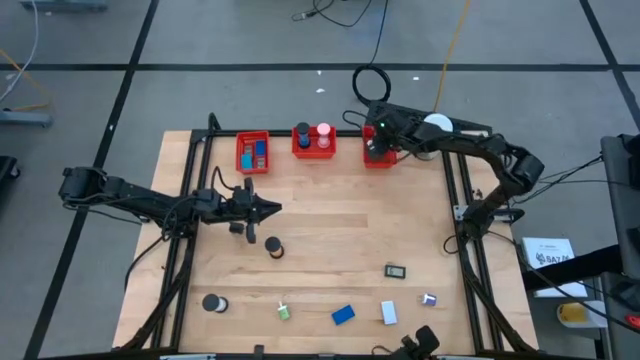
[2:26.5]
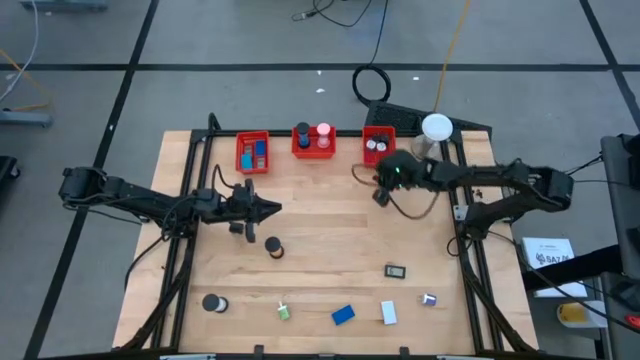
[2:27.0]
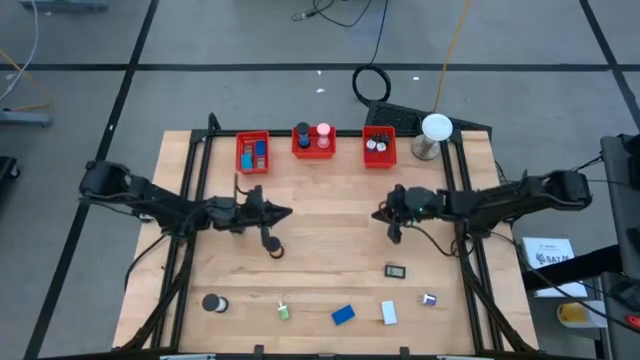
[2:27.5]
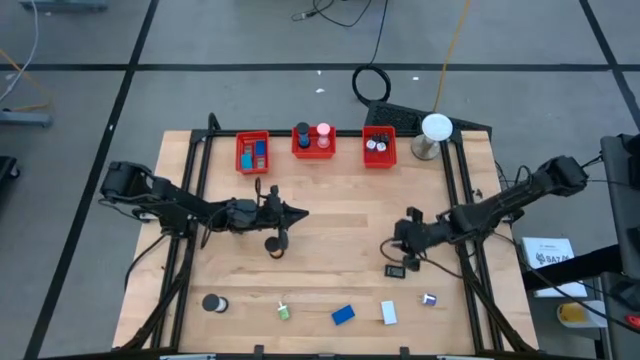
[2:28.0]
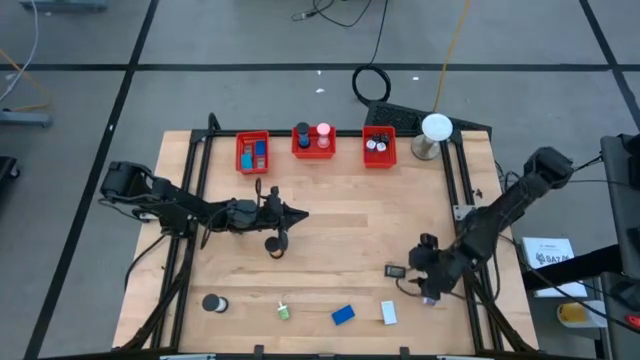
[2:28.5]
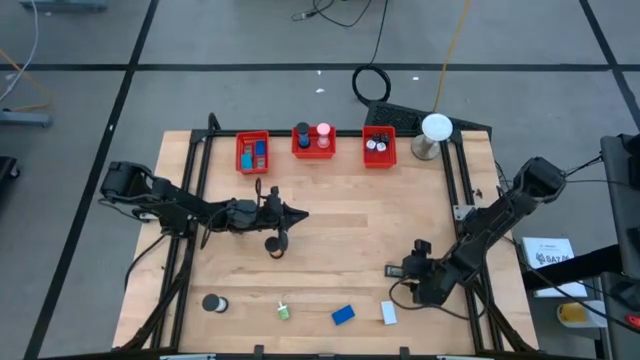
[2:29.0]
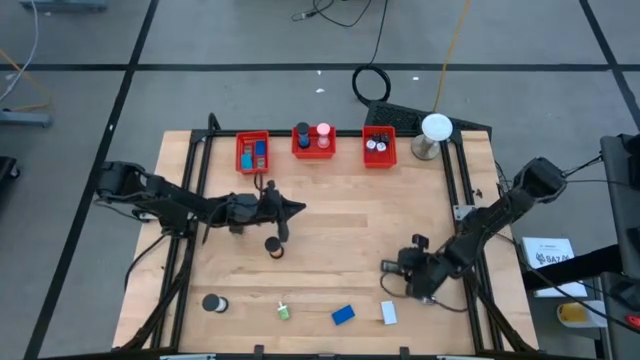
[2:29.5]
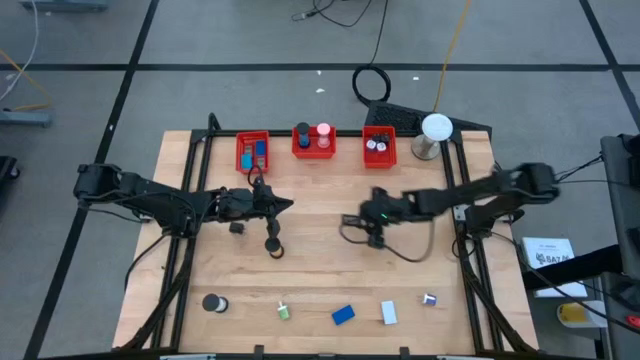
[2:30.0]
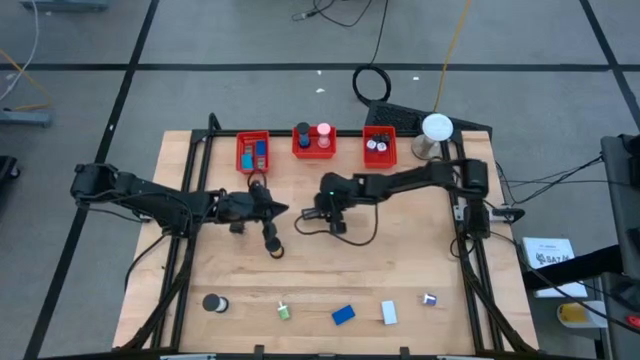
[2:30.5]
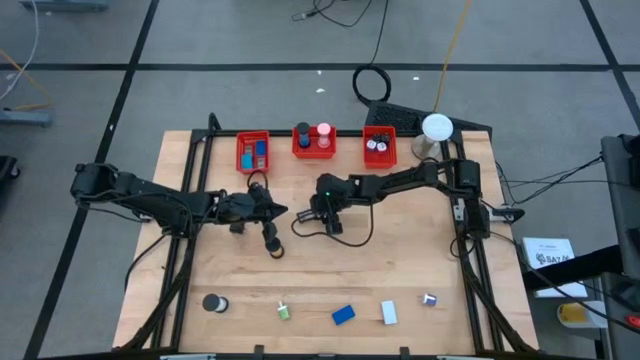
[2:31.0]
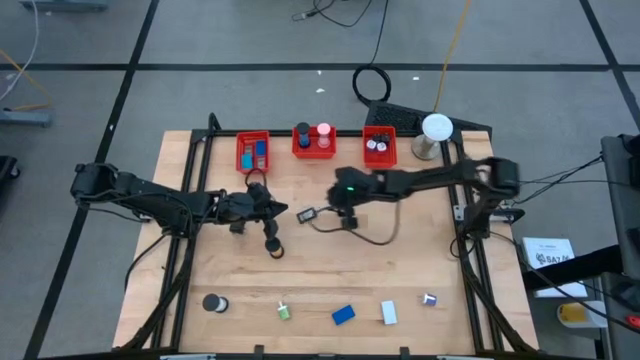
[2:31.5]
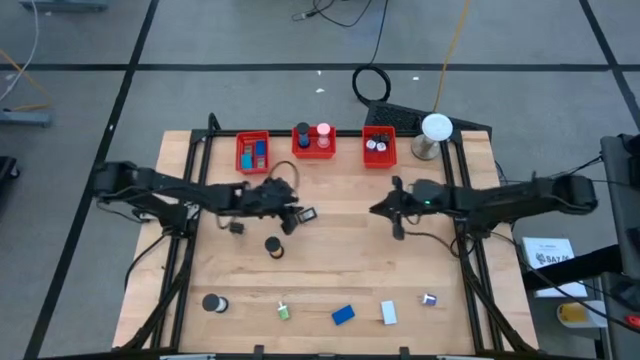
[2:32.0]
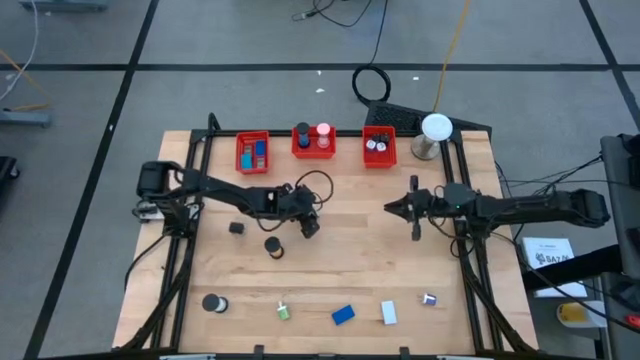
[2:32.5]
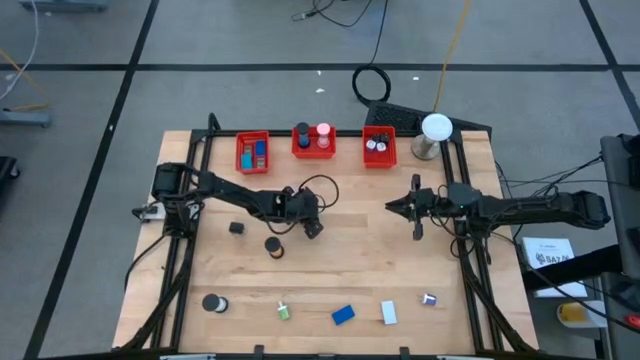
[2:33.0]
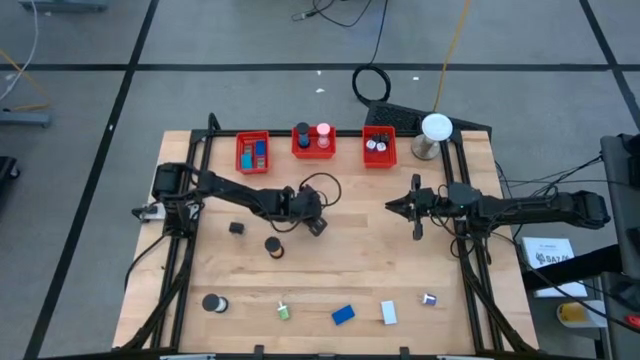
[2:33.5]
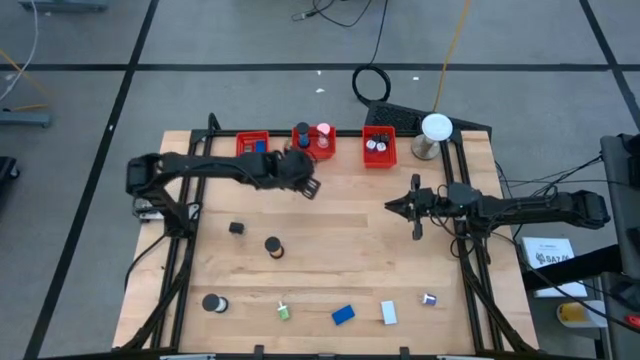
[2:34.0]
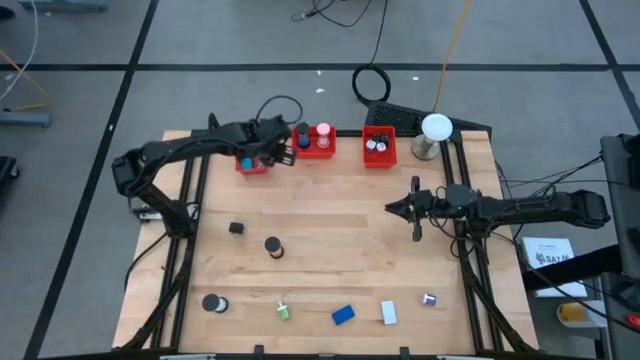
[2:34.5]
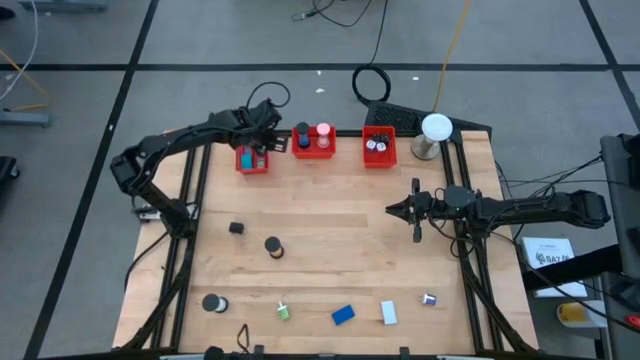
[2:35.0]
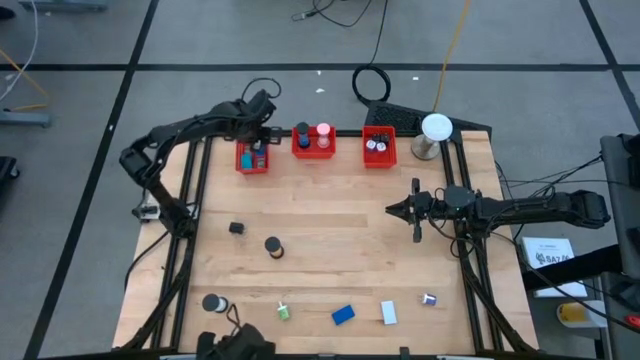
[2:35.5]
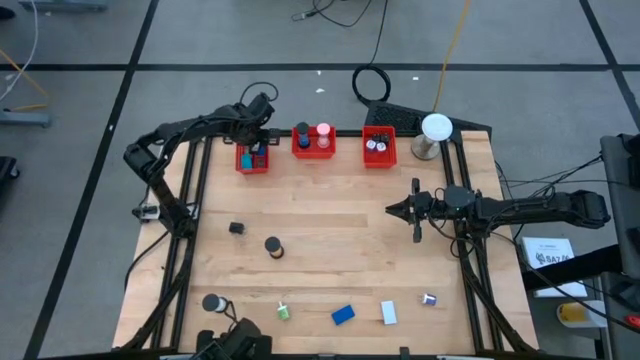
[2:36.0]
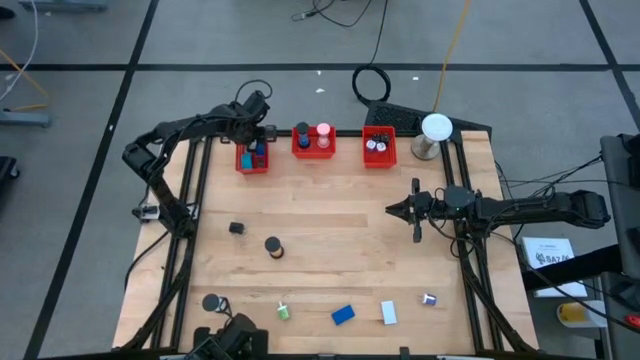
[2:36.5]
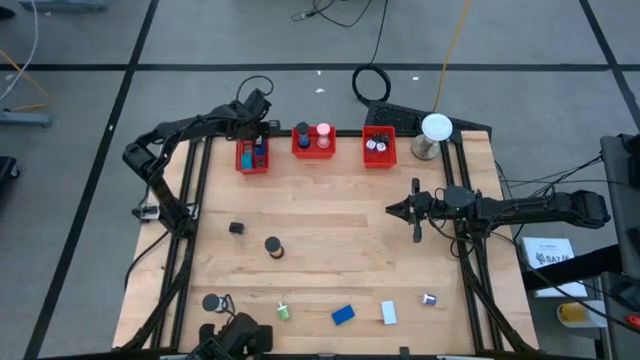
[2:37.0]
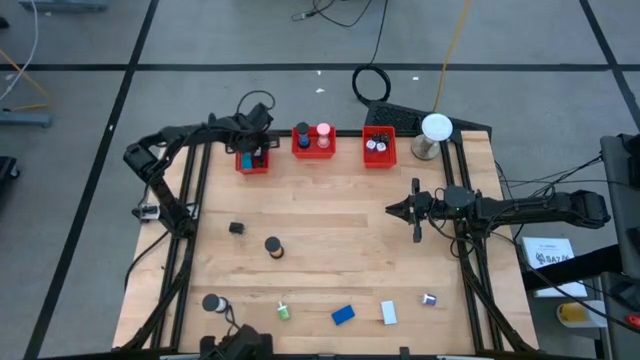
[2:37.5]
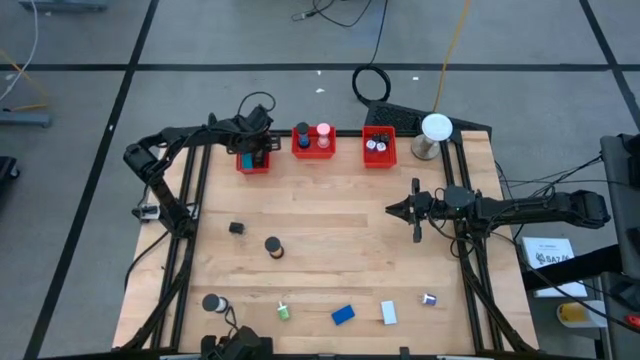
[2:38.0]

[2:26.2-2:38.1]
Task: Pick & Place Office items
Put the black timer into the left orange basket

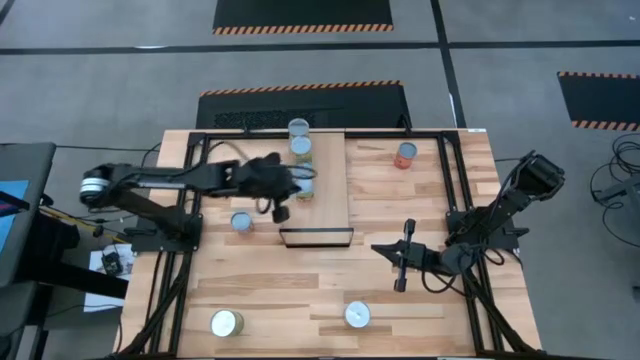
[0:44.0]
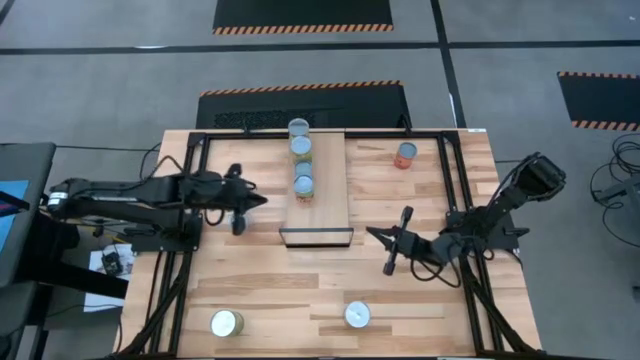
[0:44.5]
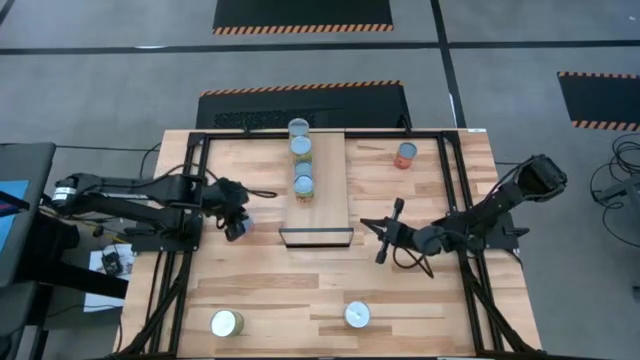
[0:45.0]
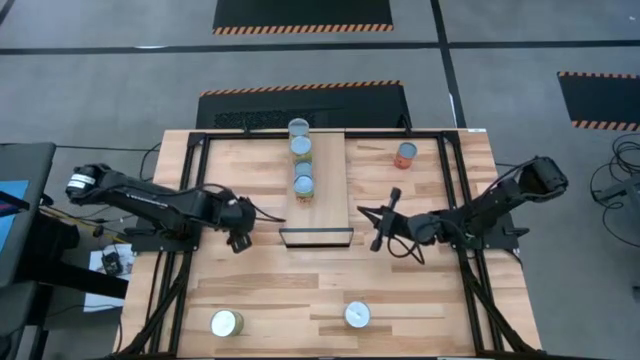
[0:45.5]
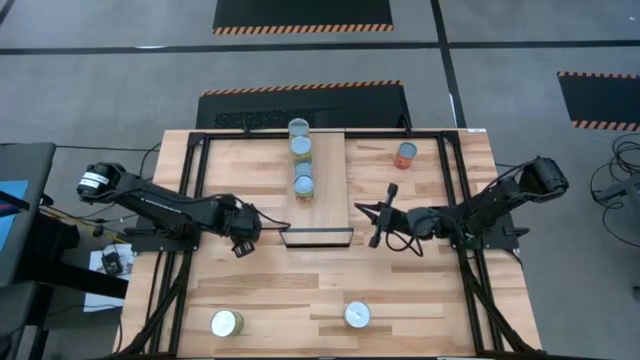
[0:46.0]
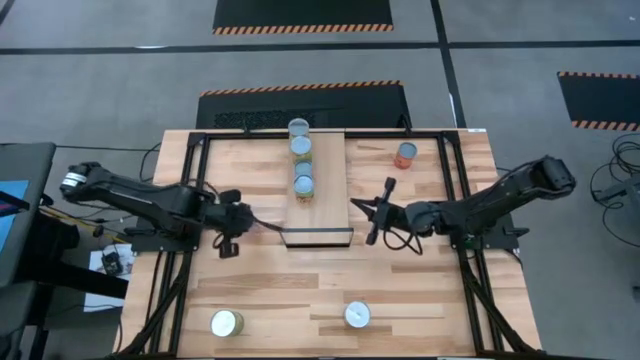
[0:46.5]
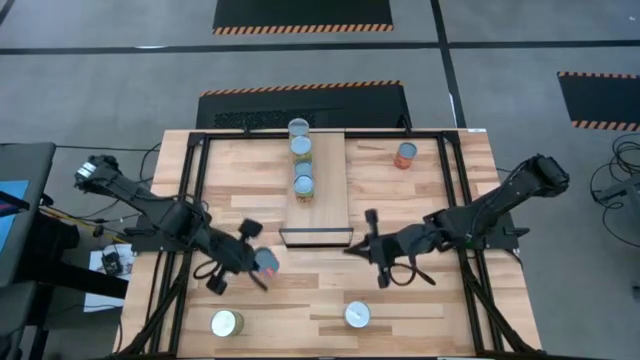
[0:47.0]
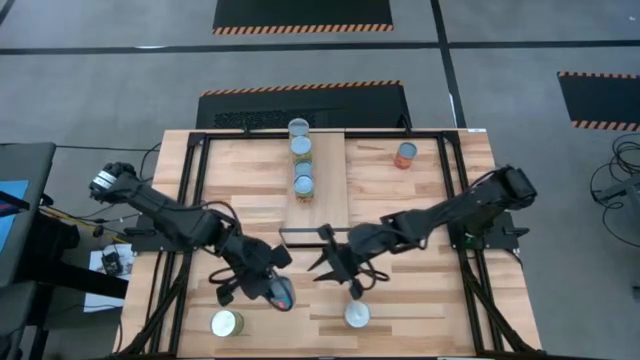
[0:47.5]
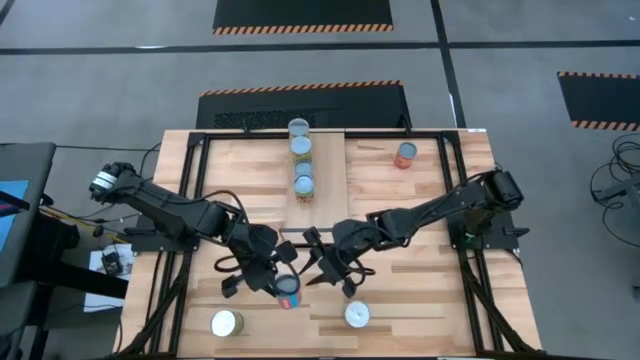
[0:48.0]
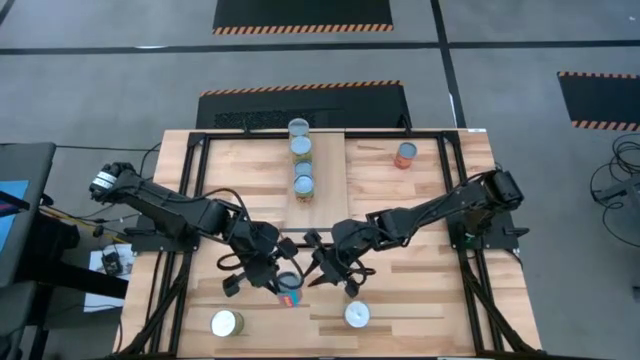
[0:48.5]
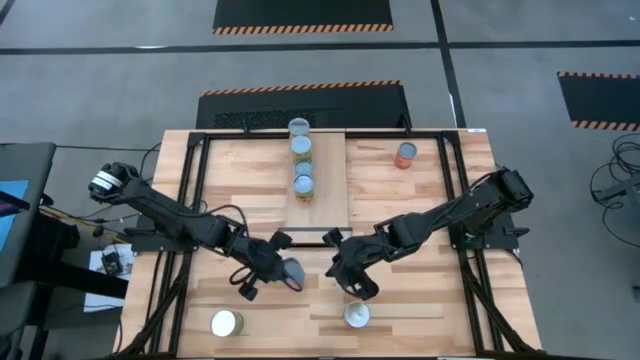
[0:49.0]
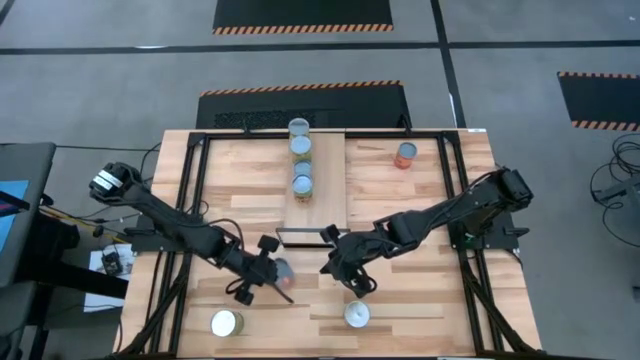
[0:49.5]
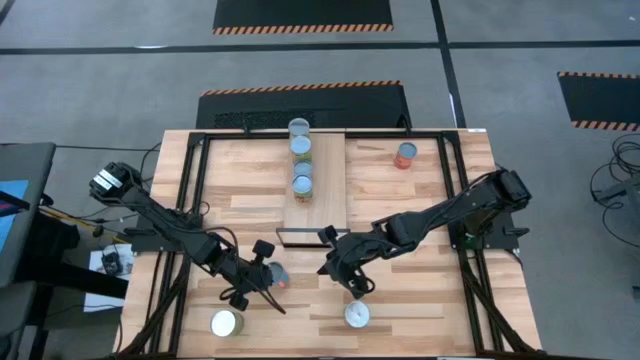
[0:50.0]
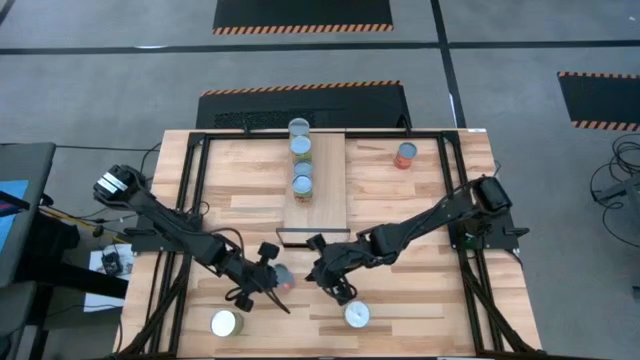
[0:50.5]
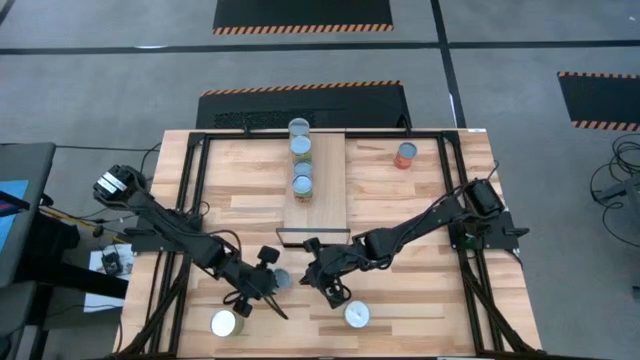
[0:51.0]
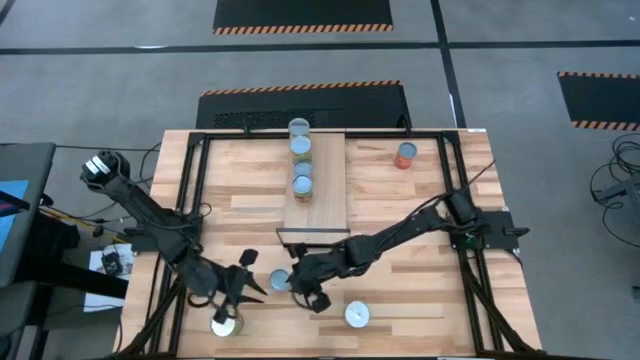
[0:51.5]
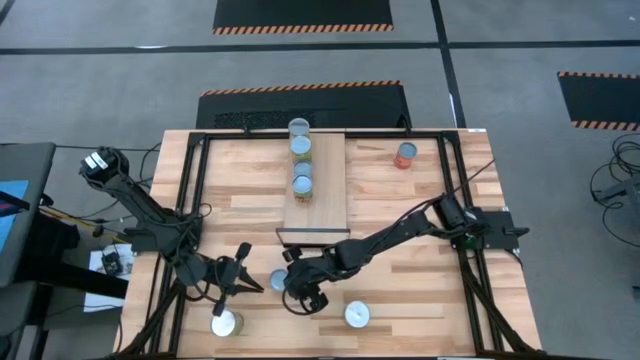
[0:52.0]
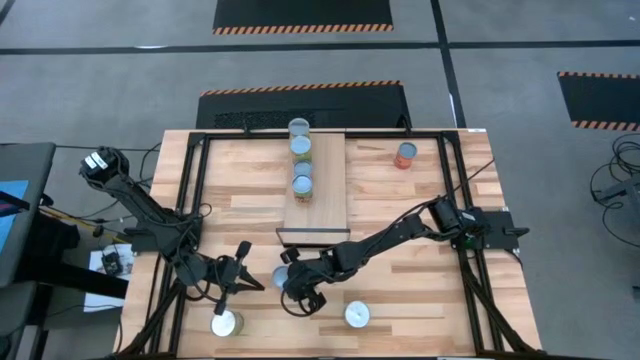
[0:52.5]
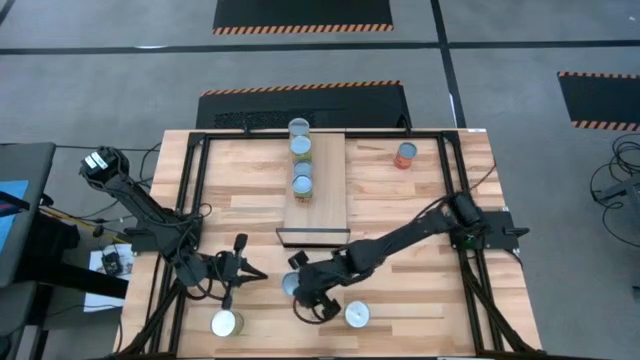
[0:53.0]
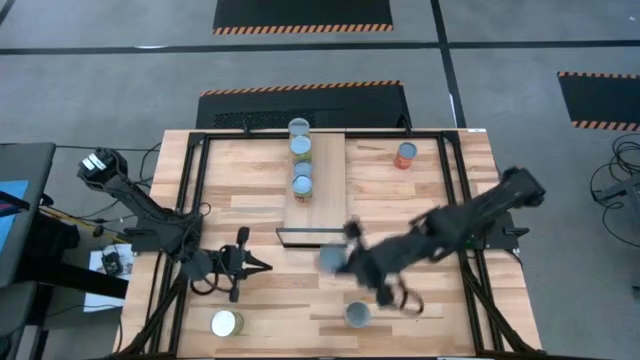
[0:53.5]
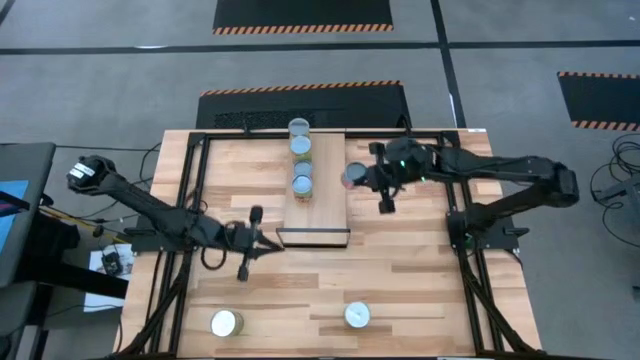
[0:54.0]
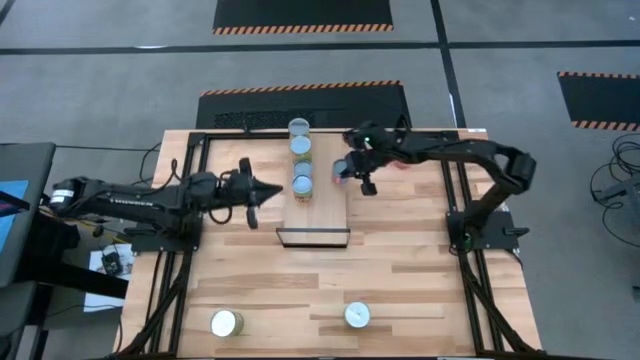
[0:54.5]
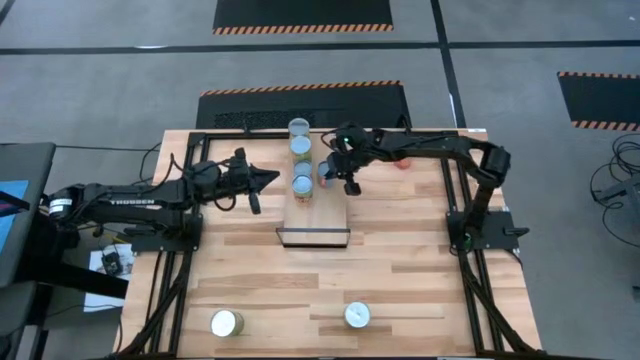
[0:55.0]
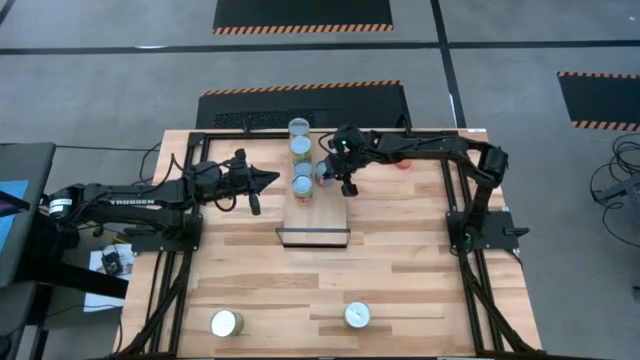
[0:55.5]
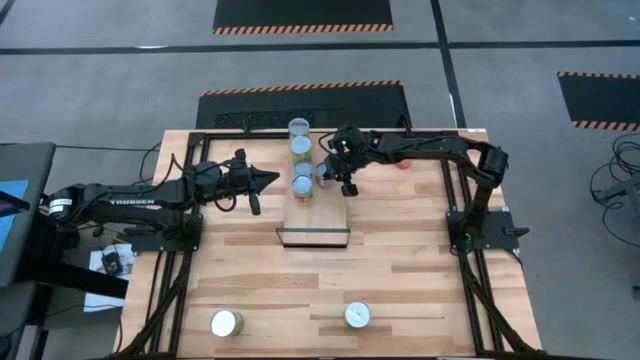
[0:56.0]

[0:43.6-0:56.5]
Task: Pick and place cans onto a shelf
Put the canned mixed veggies on the shelf
